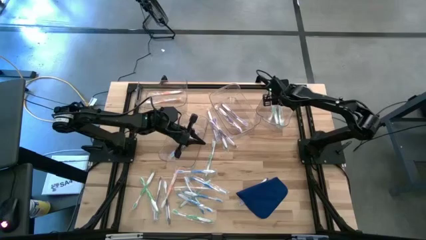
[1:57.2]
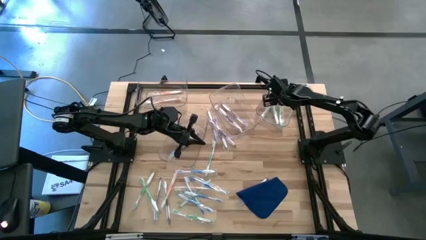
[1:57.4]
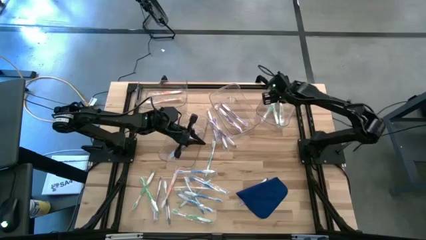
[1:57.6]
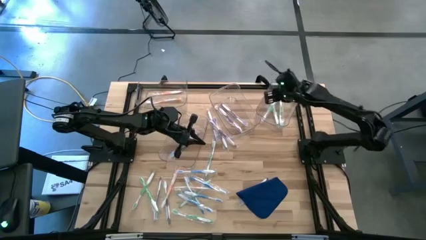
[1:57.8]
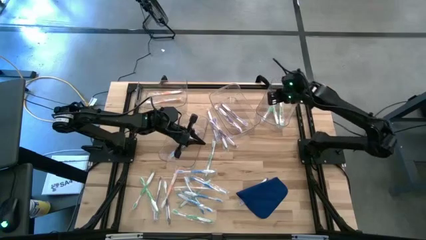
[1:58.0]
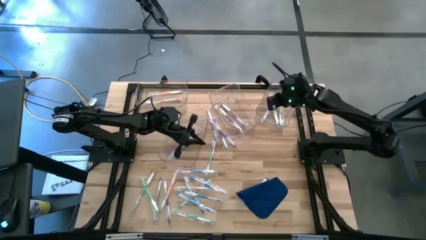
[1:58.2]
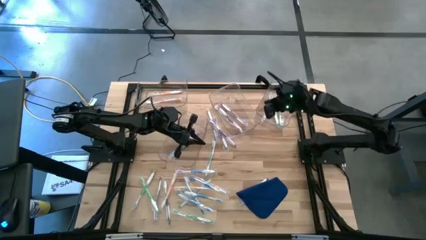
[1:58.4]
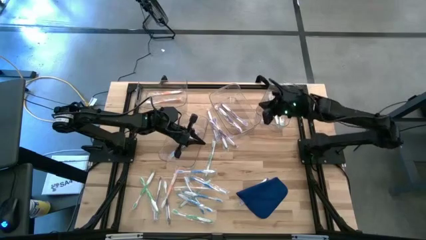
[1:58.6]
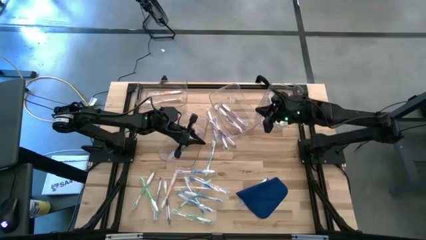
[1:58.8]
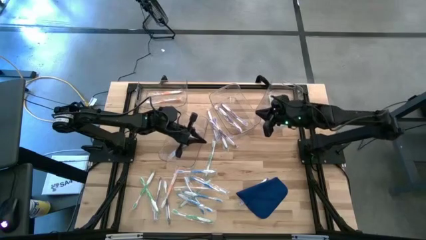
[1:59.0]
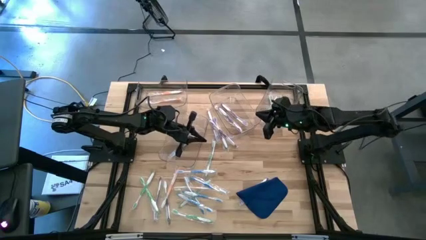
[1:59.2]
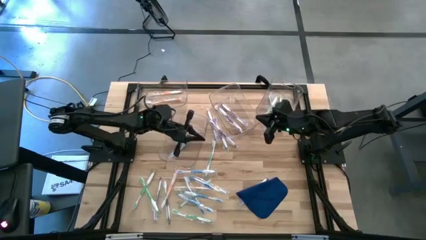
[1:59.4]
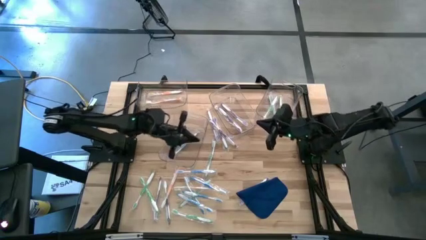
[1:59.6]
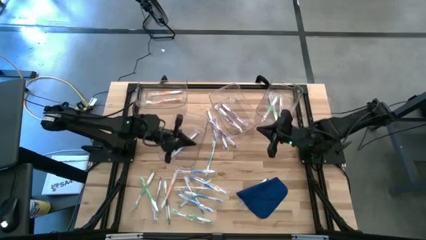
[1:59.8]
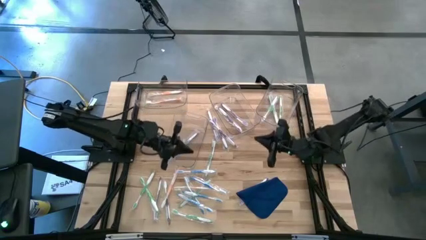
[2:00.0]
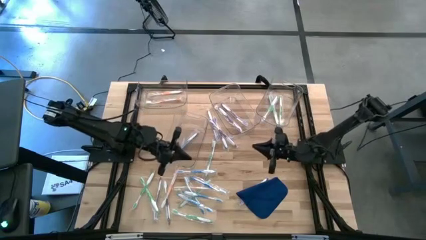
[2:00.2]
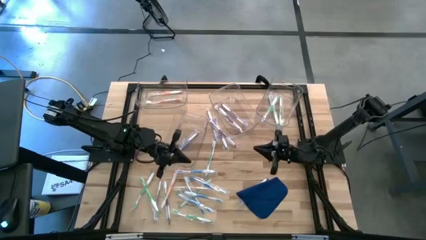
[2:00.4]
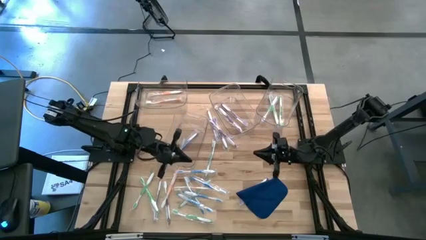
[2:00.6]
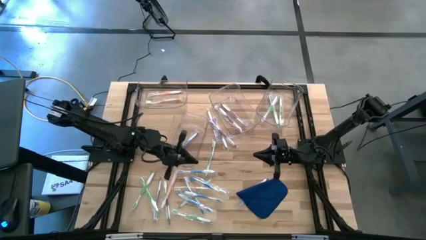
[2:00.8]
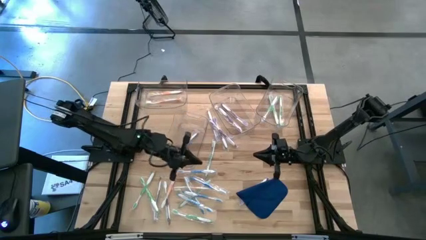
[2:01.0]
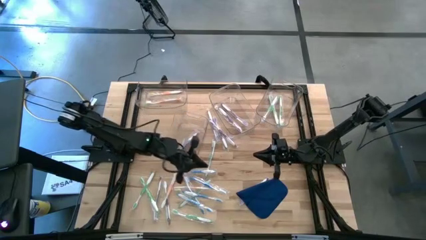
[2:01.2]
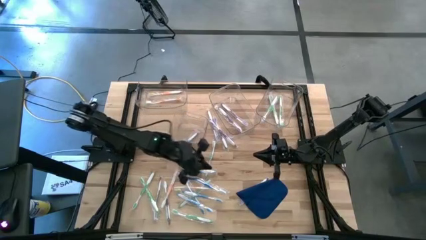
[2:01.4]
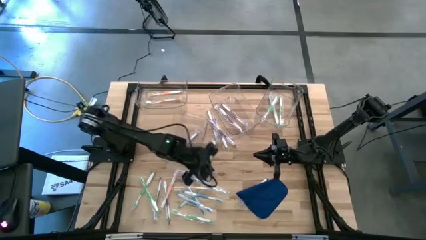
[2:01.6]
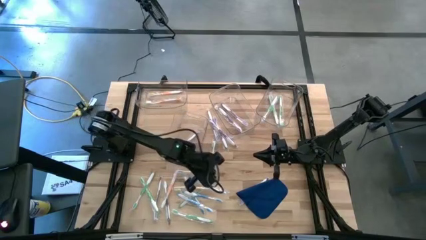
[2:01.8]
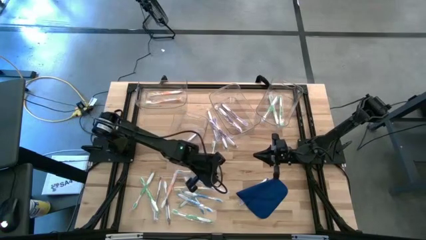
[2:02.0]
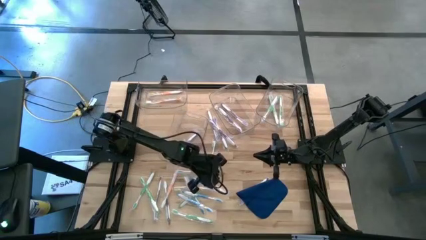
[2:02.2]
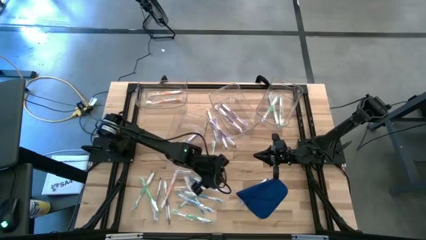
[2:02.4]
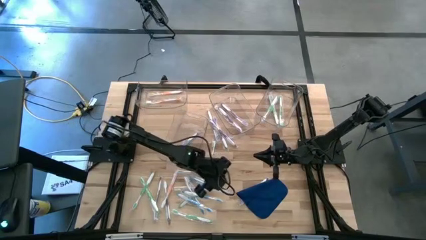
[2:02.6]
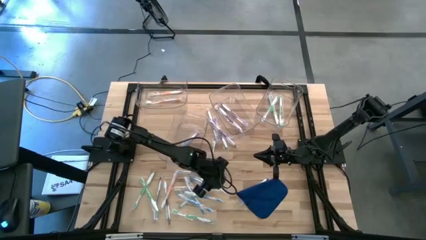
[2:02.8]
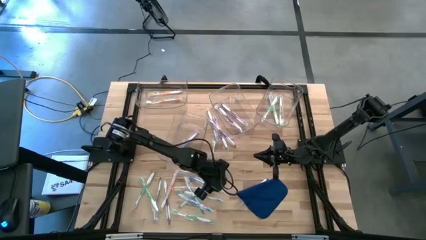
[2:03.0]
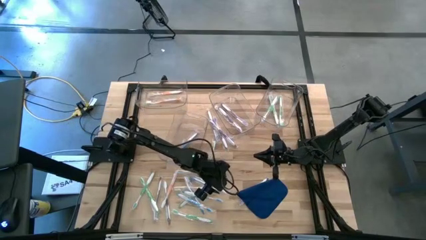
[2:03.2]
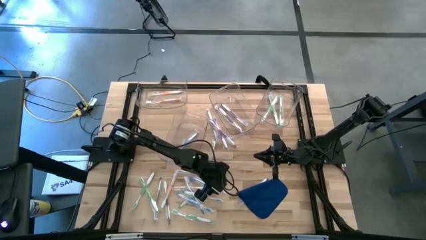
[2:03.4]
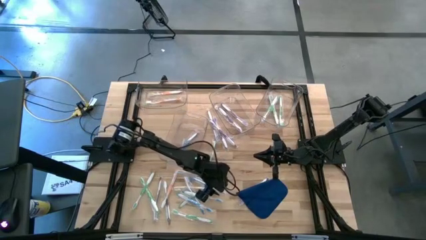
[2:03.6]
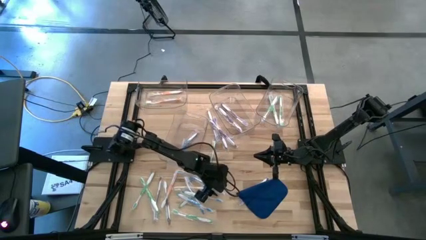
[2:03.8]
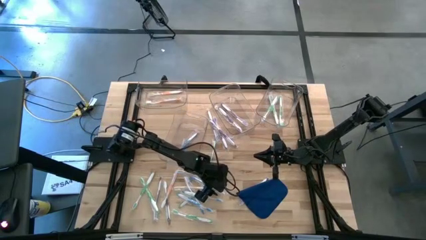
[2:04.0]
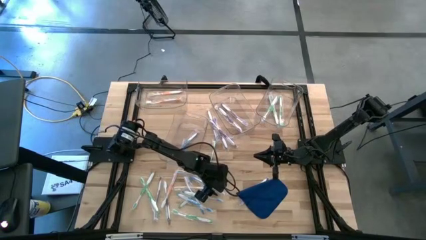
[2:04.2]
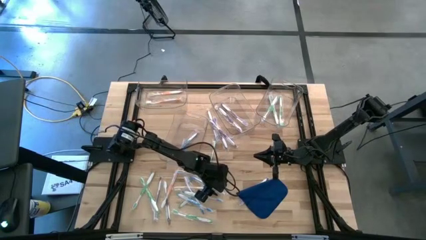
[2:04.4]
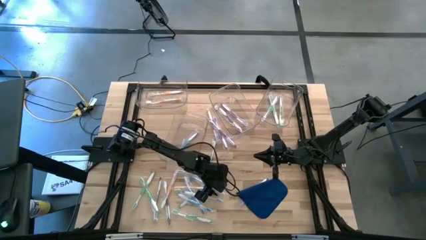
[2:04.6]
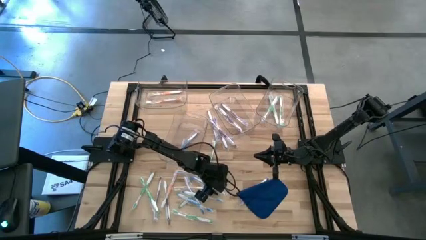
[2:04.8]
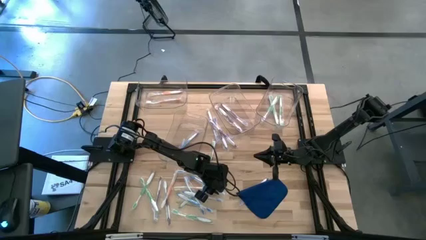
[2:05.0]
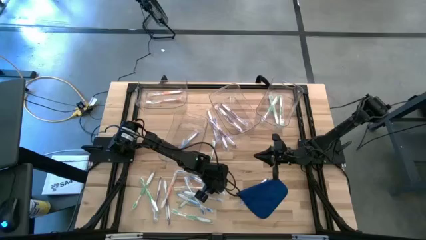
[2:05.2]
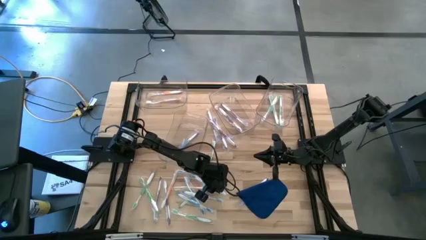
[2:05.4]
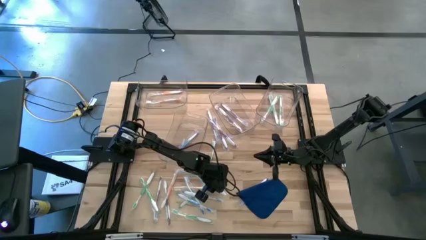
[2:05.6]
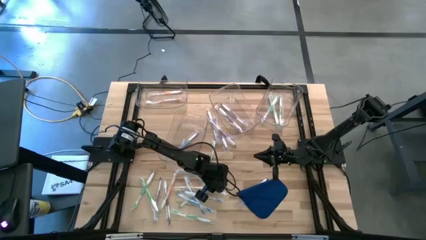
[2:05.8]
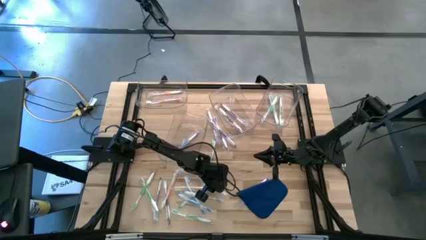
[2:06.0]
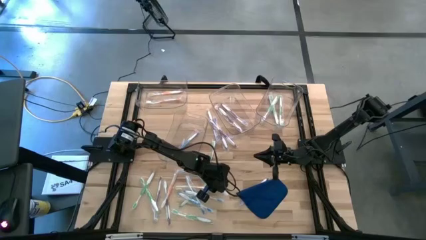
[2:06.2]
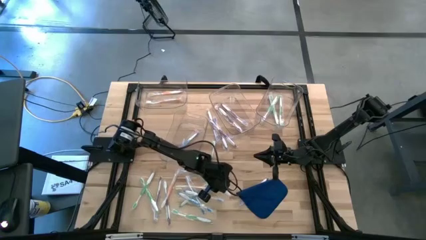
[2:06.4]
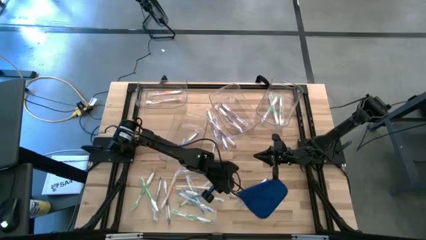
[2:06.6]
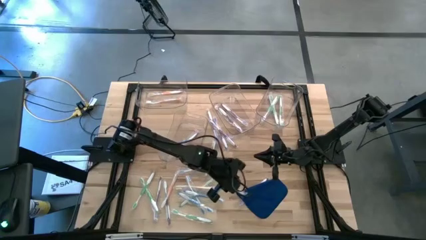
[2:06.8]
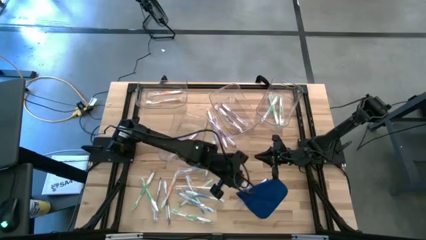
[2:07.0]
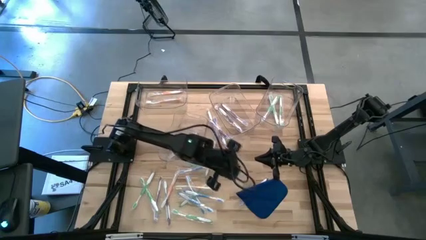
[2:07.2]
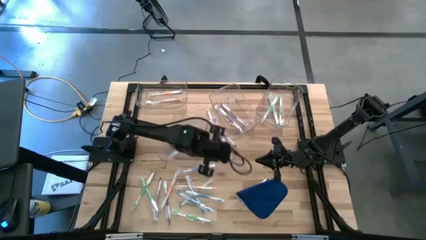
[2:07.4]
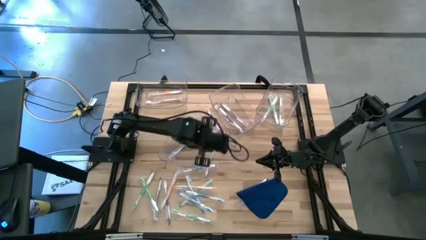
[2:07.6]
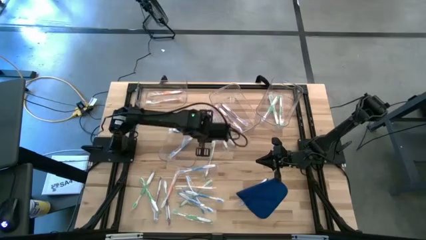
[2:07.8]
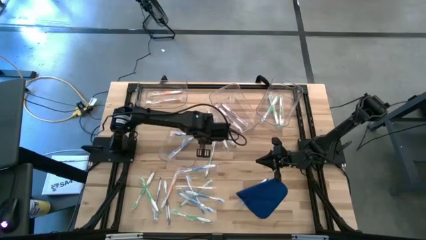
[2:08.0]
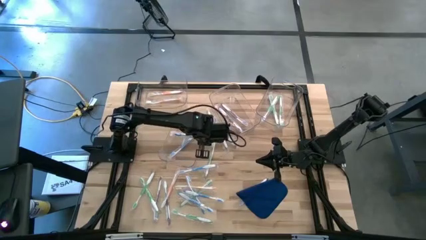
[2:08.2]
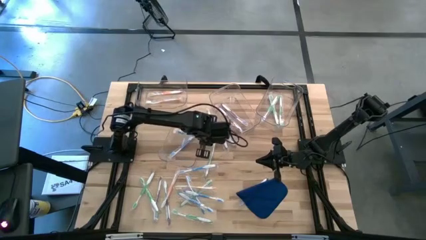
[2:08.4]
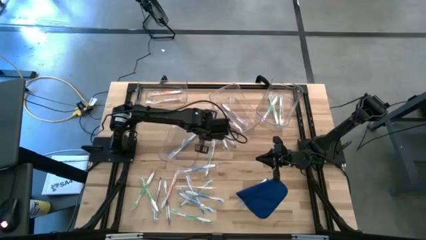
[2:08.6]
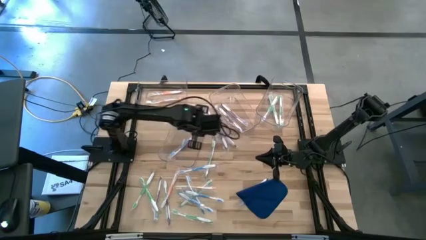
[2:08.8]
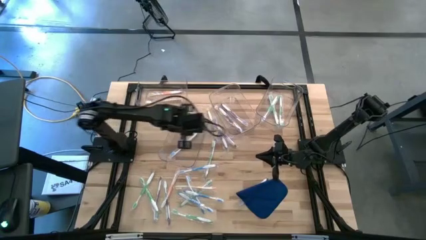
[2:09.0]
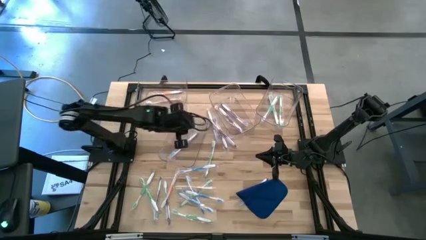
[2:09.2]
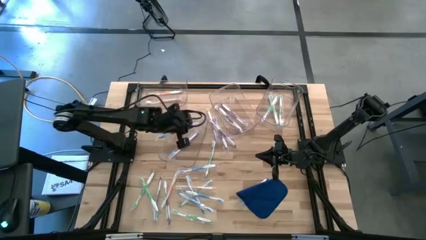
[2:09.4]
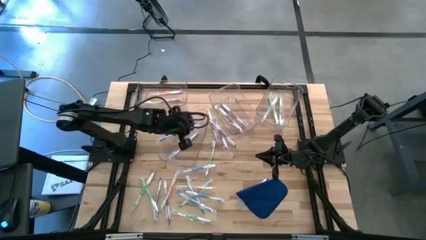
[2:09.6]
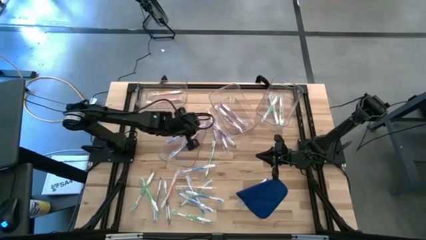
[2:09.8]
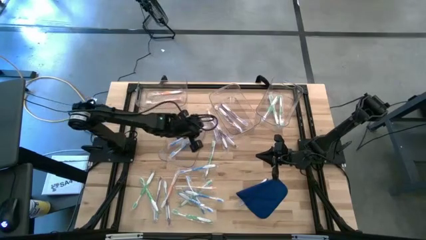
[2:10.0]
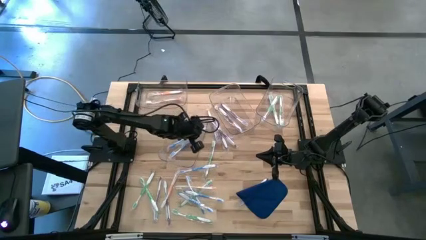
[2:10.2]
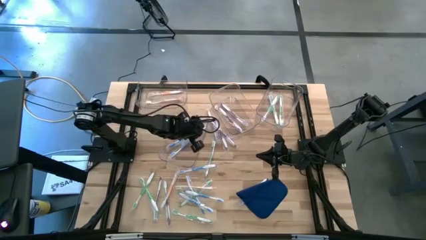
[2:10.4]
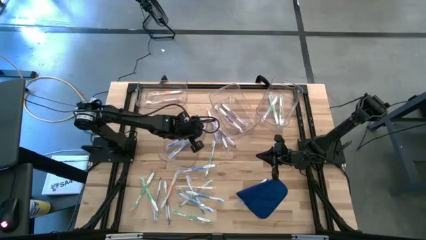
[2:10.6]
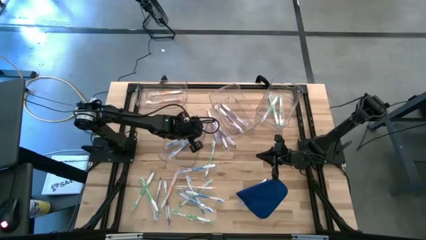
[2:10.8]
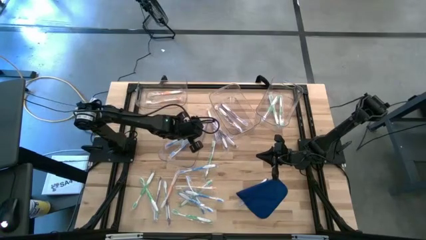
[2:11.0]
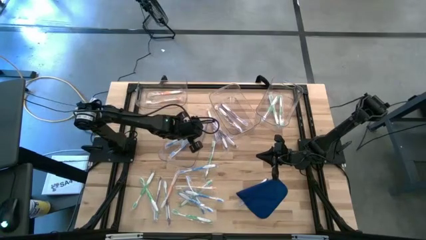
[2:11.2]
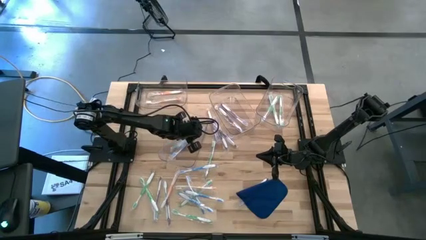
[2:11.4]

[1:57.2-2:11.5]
Task: Pick & Place Toothbrushes
Put the blue toothbrush into the bottom transparent bin
